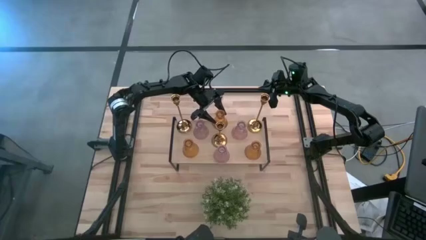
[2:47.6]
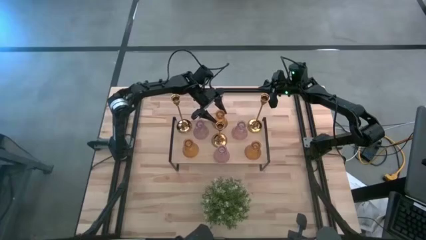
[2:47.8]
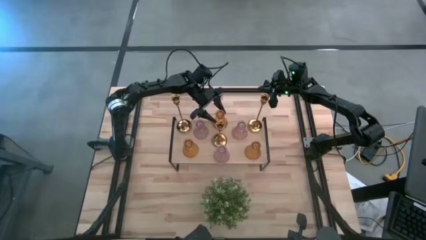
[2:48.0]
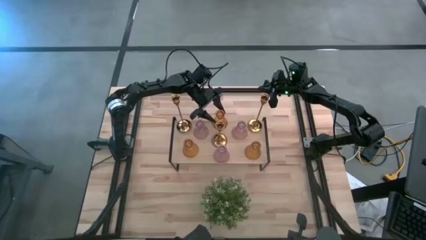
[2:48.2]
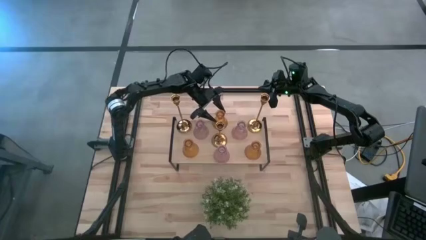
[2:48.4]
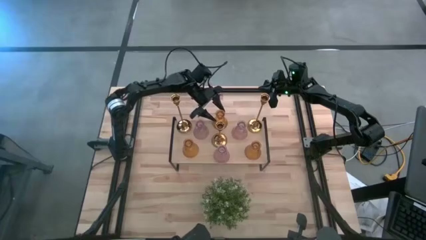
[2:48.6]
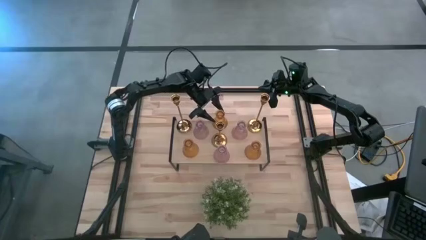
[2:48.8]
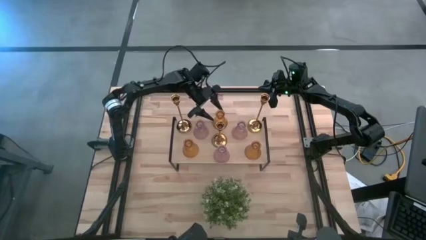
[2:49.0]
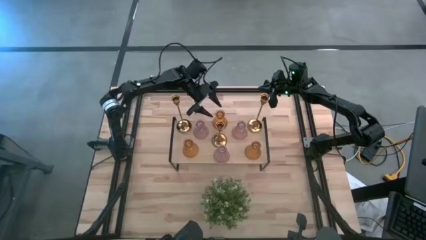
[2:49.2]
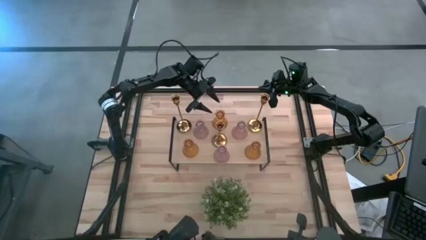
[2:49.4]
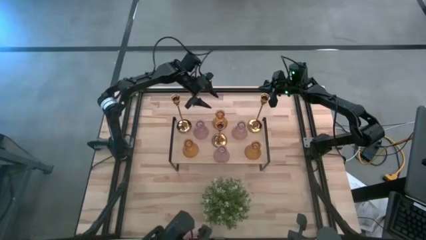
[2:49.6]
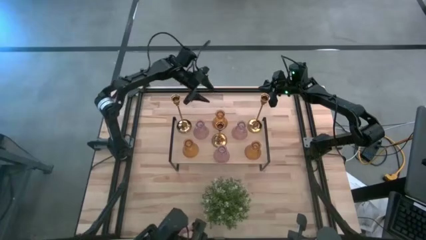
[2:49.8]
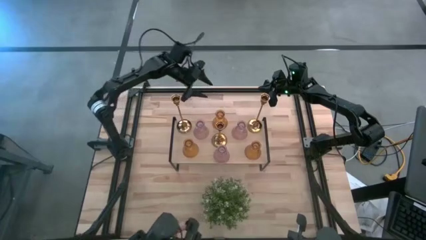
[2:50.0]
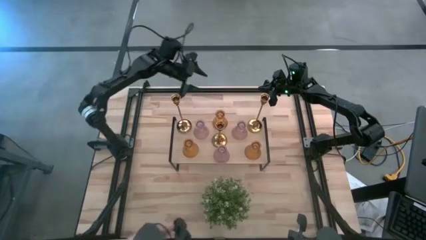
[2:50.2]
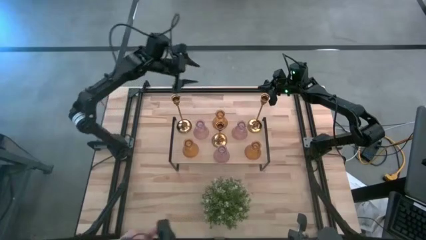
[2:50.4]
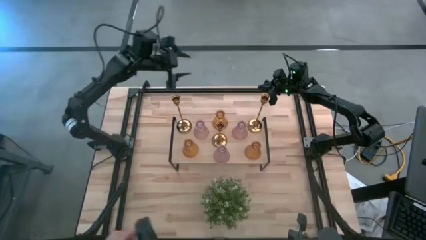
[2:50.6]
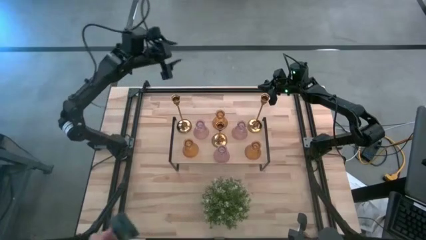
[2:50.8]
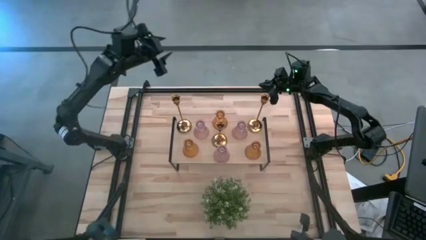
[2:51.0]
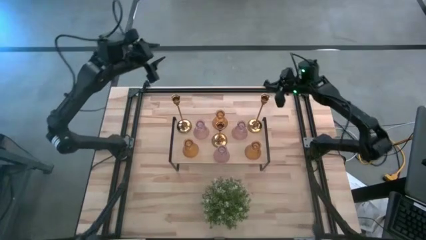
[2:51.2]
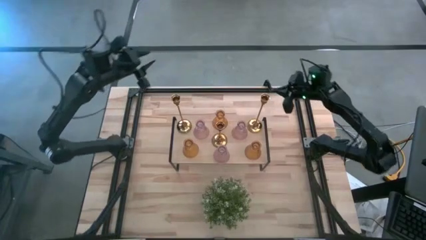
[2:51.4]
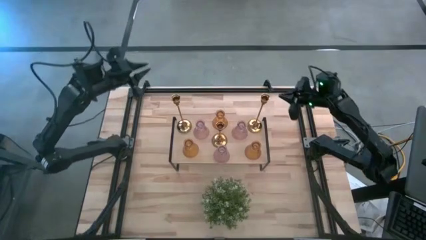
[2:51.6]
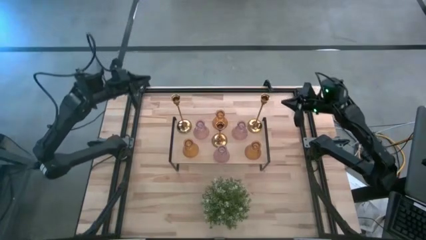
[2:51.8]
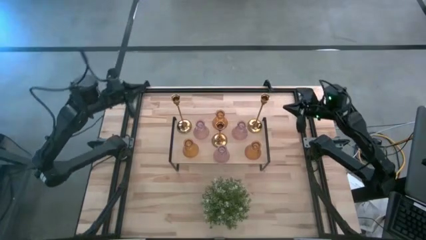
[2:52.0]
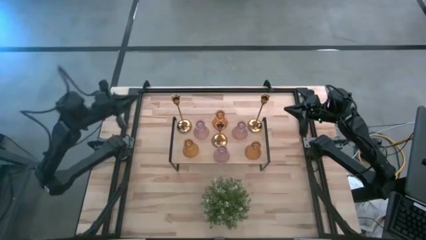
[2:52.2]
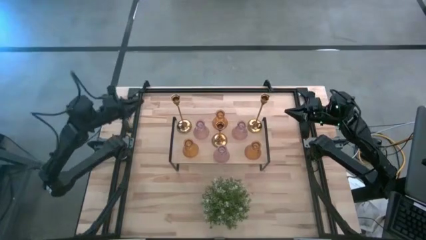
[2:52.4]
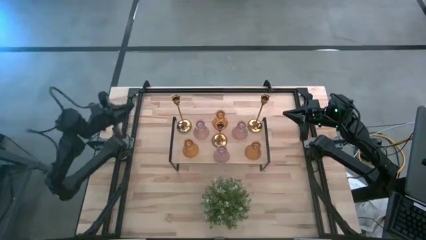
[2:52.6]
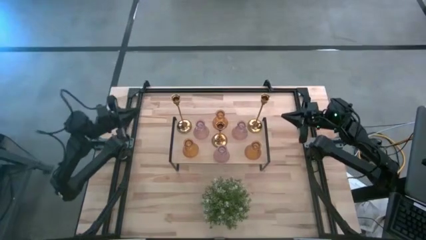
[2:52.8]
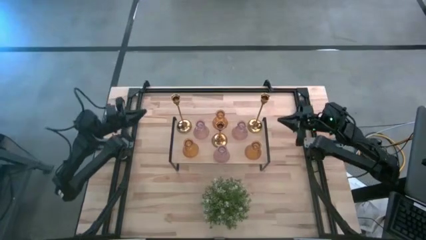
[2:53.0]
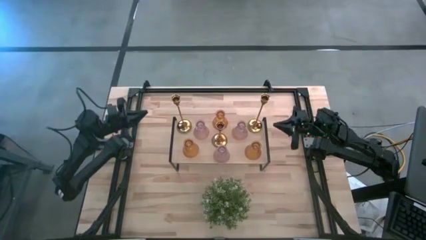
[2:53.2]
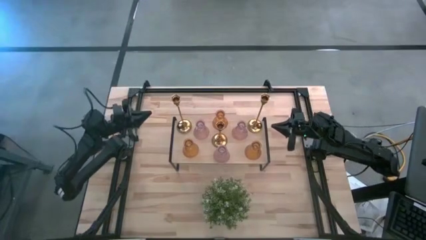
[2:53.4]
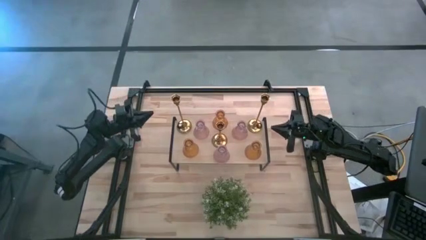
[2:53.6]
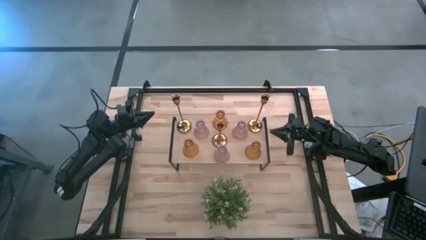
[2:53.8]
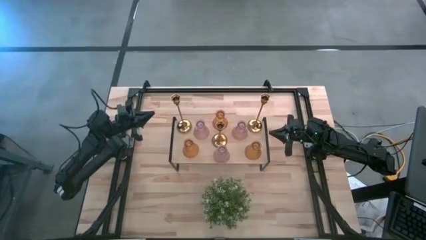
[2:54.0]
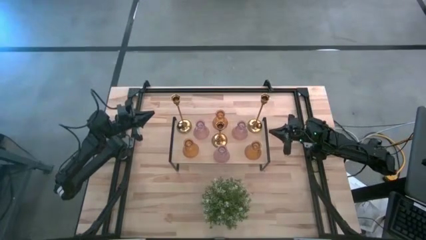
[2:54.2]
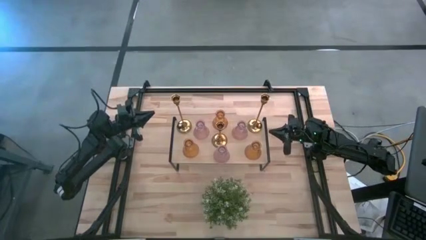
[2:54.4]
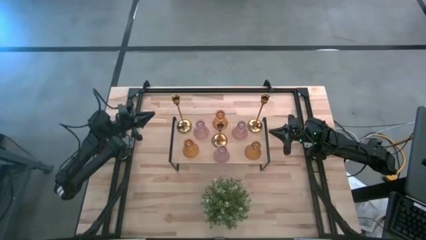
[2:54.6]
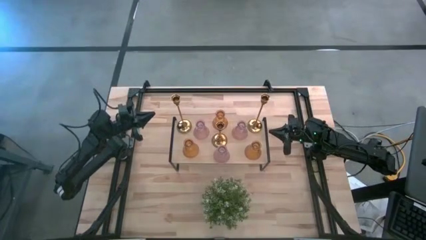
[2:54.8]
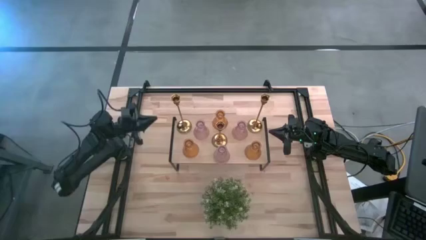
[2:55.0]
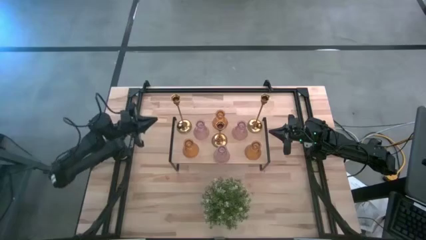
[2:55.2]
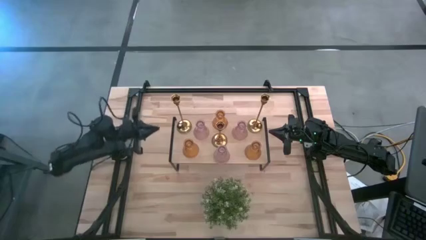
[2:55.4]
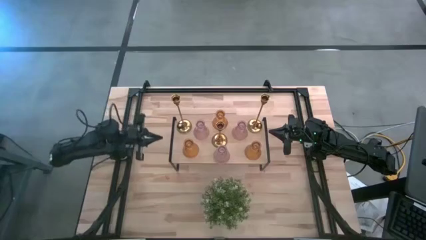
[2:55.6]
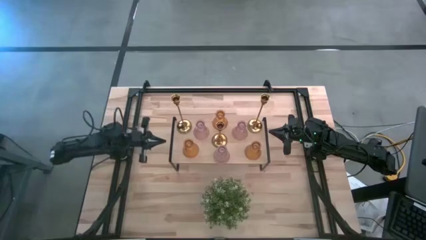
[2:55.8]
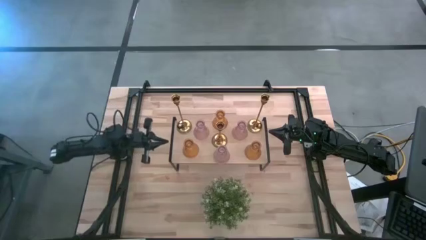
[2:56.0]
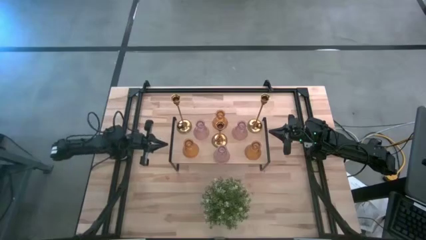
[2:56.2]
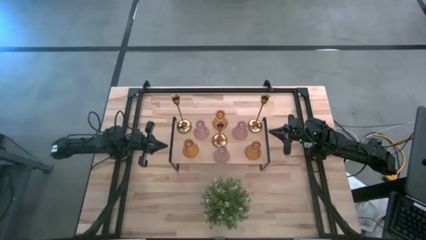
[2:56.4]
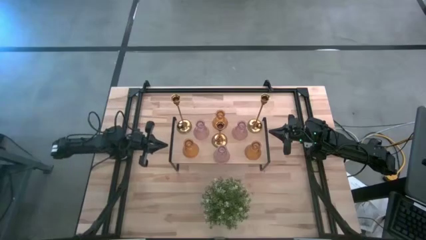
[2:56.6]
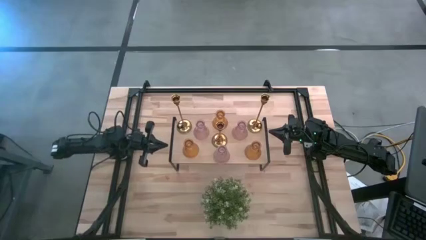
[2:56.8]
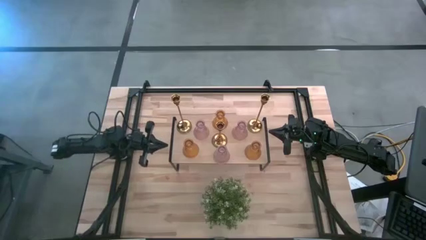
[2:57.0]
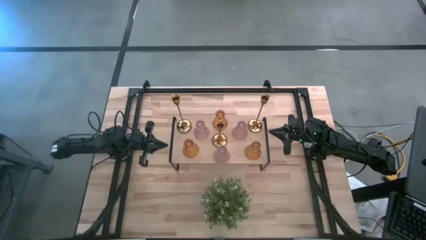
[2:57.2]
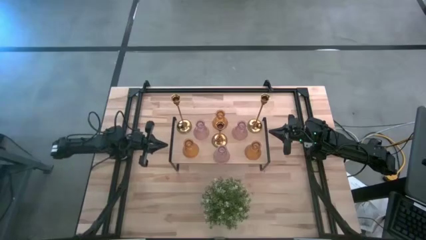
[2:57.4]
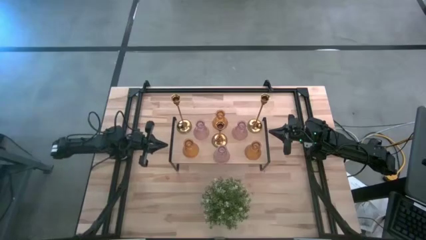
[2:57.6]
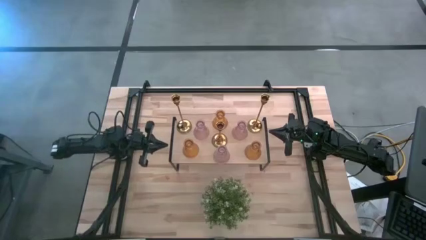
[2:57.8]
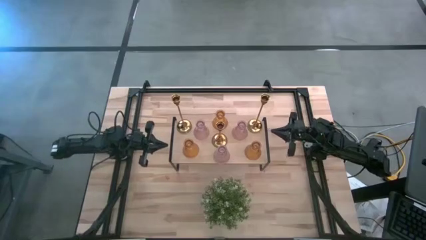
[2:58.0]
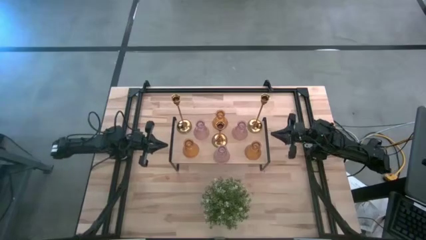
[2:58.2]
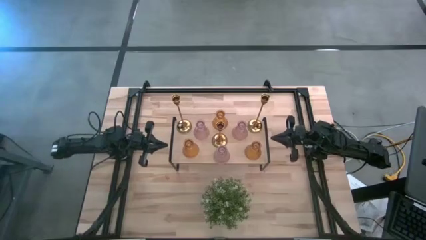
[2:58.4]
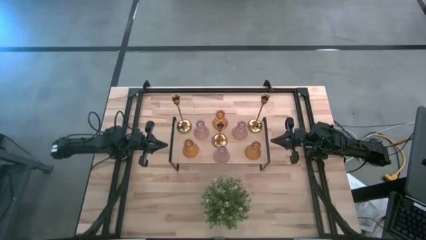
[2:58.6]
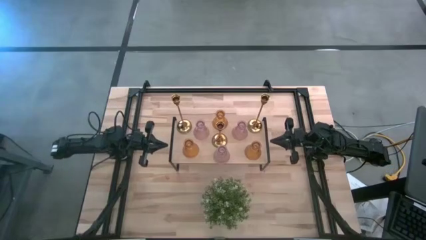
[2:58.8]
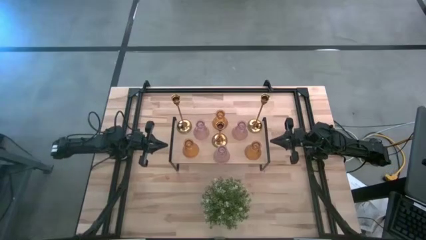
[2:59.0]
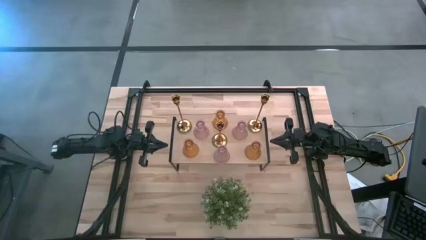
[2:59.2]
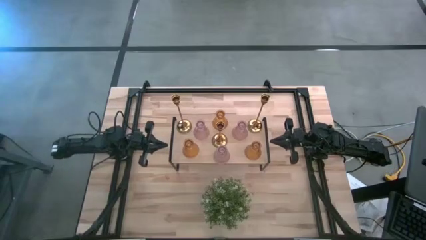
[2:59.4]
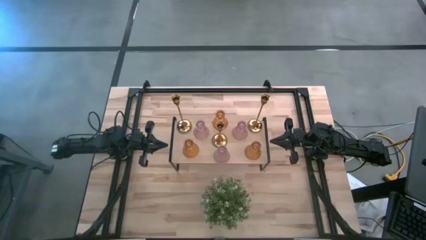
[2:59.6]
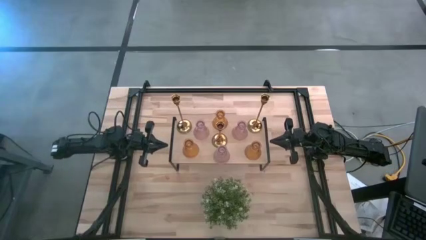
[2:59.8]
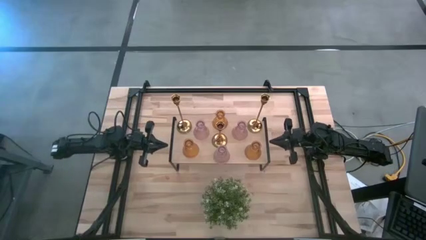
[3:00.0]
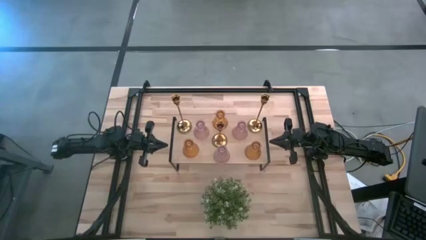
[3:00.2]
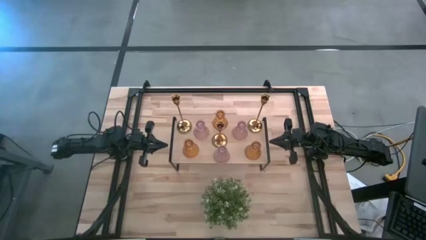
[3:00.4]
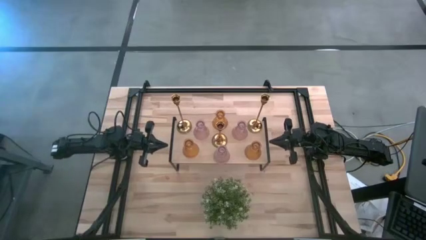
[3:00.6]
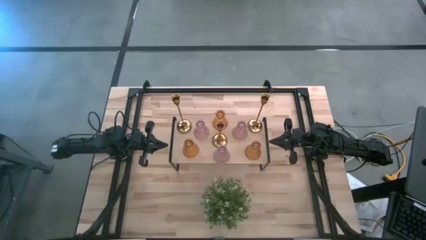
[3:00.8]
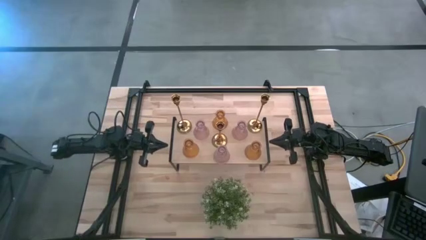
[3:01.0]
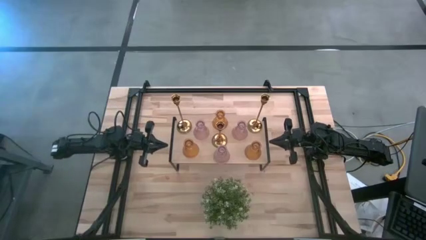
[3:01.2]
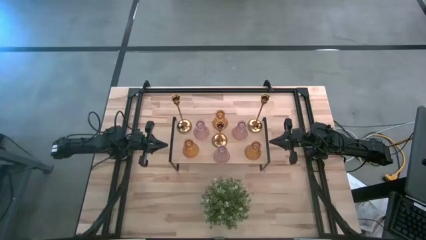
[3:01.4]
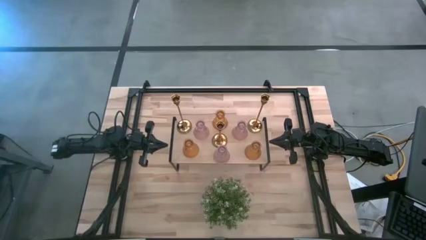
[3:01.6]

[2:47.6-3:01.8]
Task: Pick & Place candle stick holders
Return to Home Position

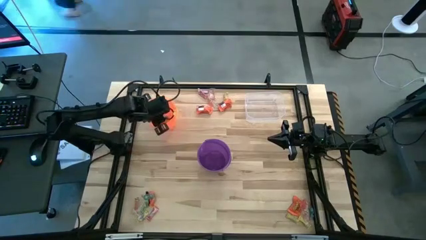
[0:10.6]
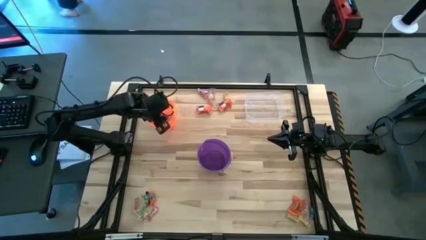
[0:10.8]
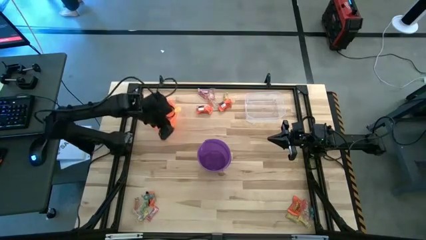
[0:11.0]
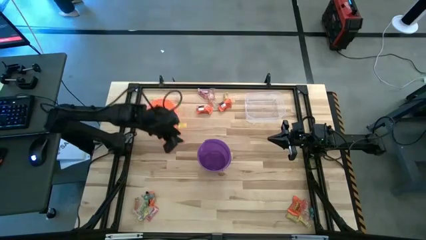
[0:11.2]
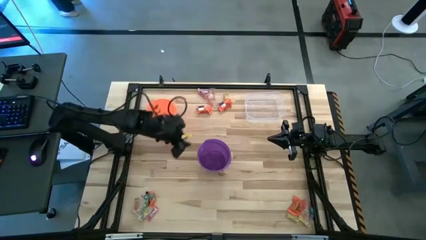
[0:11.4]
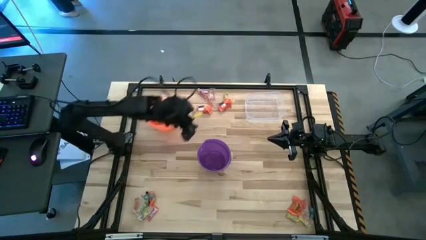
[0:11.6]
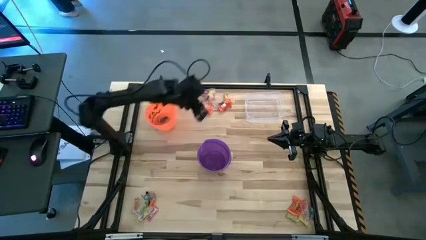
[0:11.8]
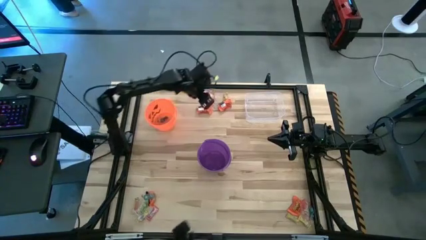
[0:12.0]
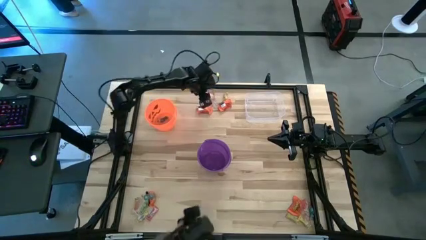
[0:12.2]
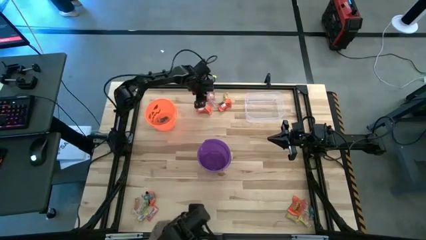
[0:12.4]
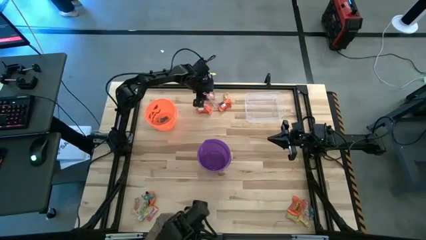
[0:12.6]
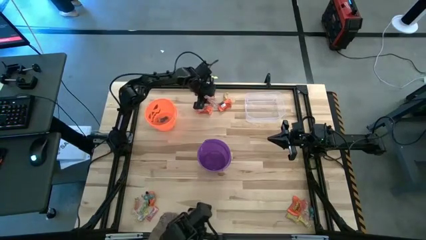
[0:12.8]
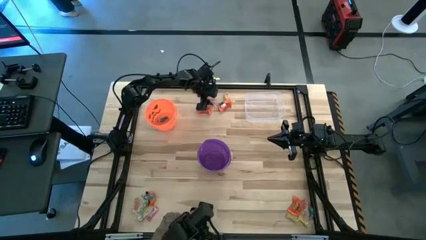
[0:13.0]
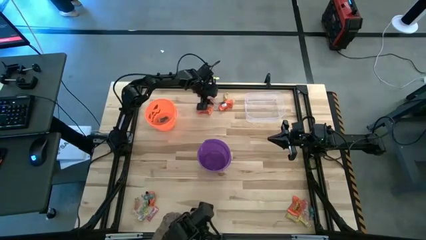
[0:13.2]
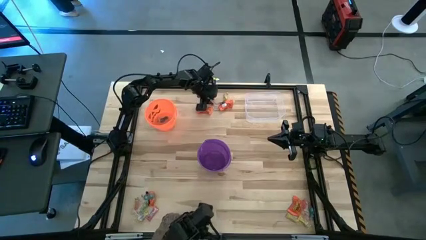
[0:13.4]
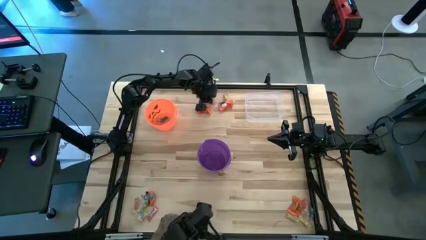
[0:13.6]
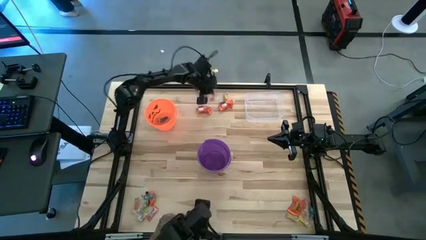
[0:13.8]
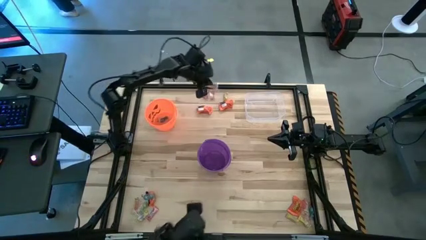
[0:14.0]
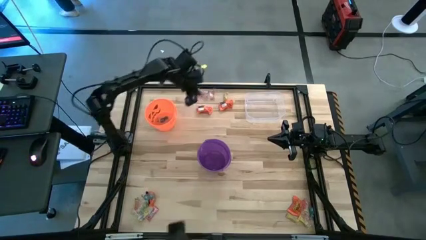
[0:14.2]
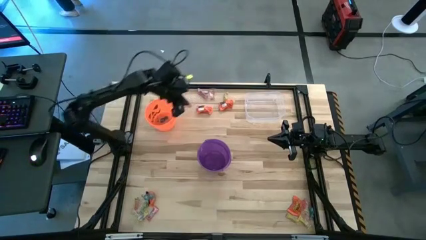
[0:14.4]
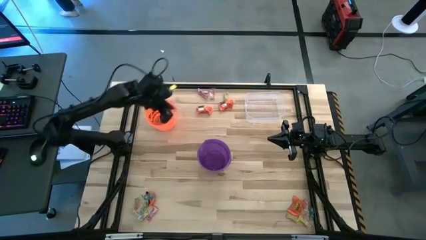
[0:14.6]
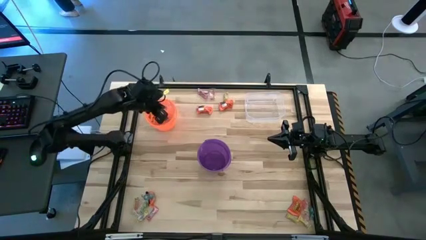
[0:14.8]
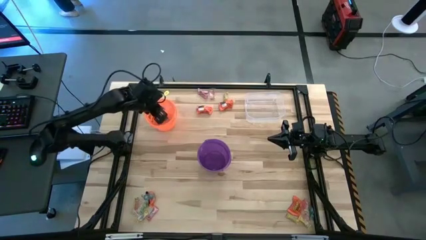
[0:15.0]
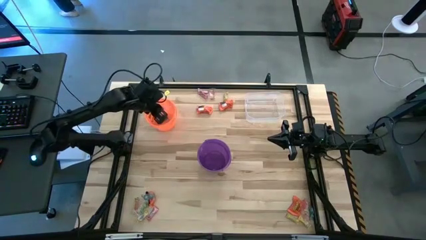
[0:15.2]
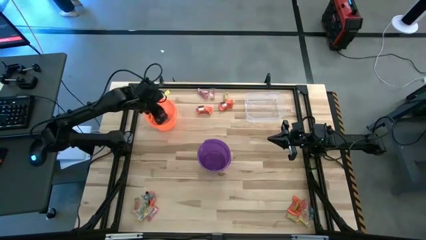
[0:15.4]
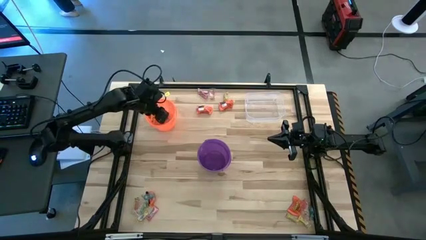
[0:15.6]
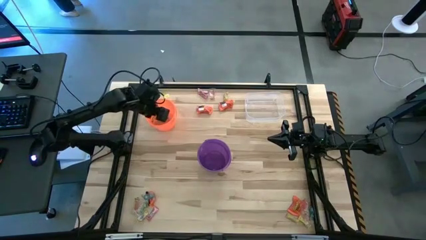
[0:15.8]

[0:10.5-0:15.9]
Task: Sort candy by brand, put in halloween buckets
Put the orange gummy into the orange bucket
